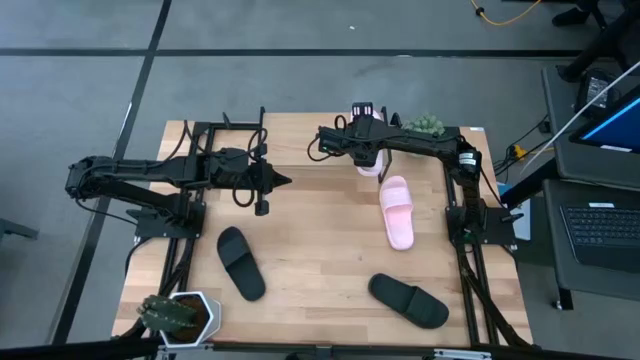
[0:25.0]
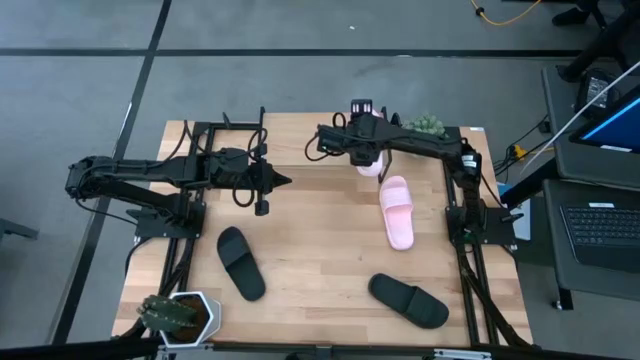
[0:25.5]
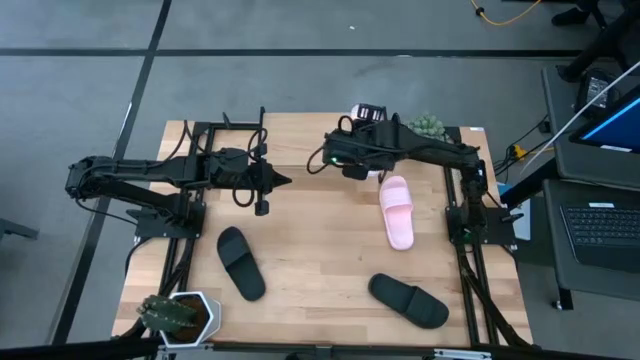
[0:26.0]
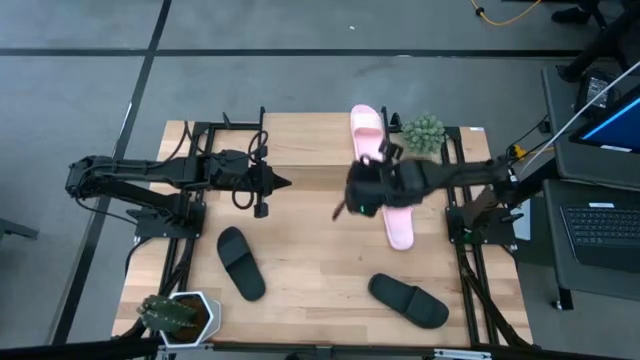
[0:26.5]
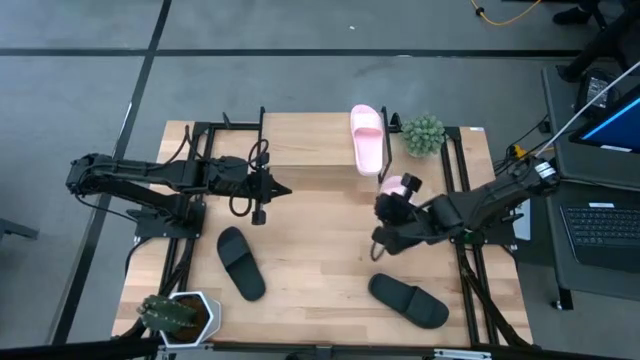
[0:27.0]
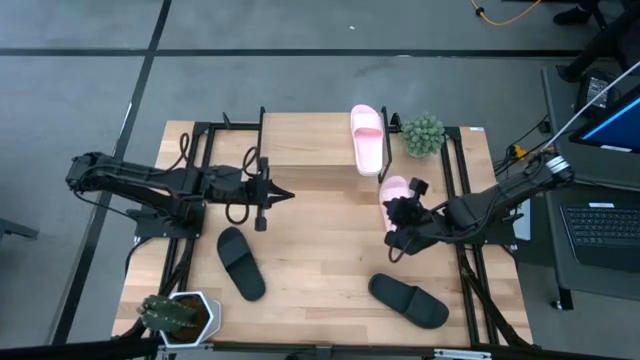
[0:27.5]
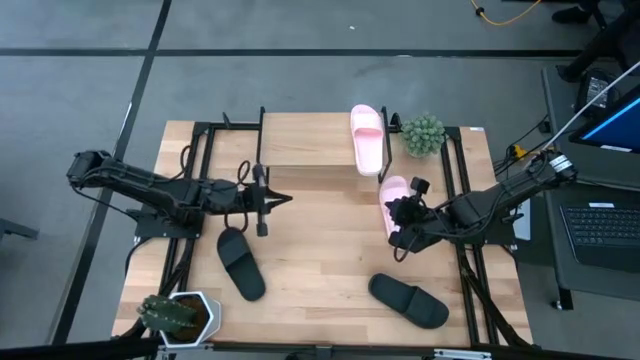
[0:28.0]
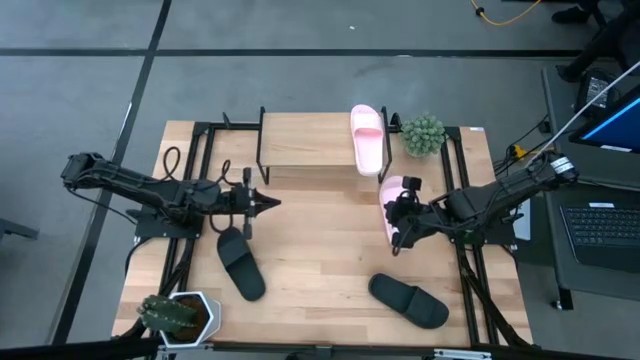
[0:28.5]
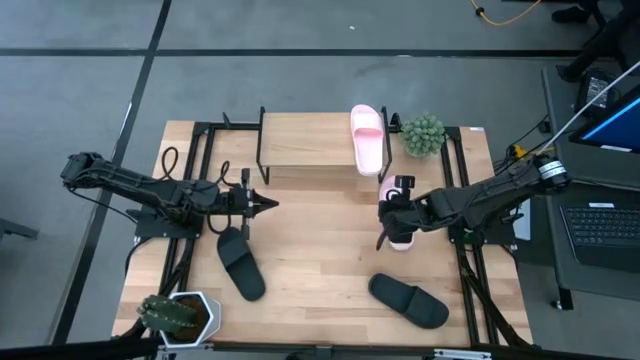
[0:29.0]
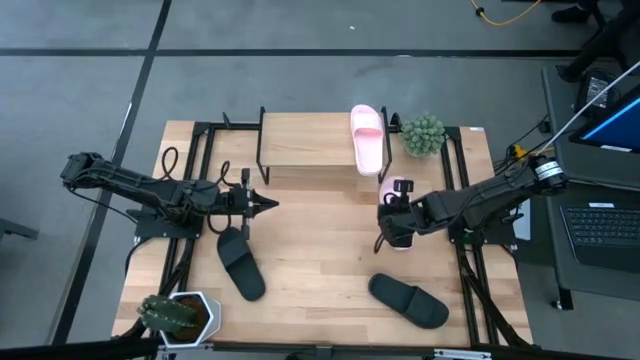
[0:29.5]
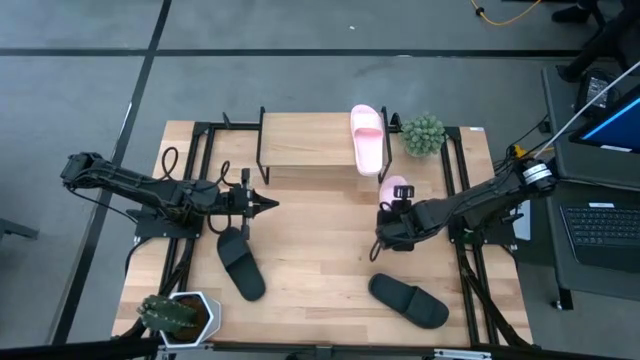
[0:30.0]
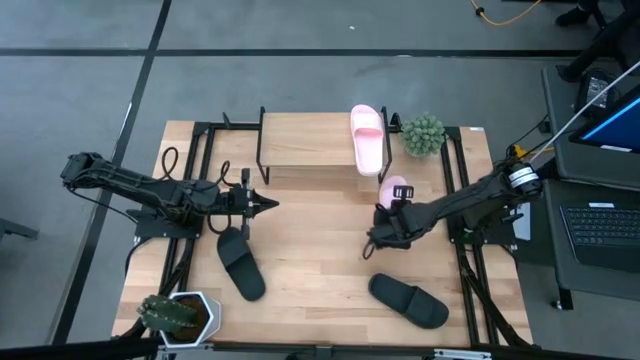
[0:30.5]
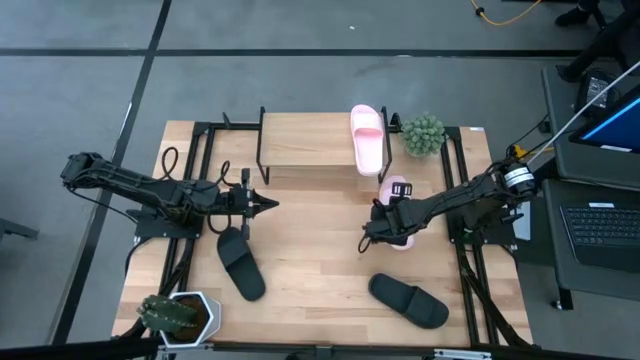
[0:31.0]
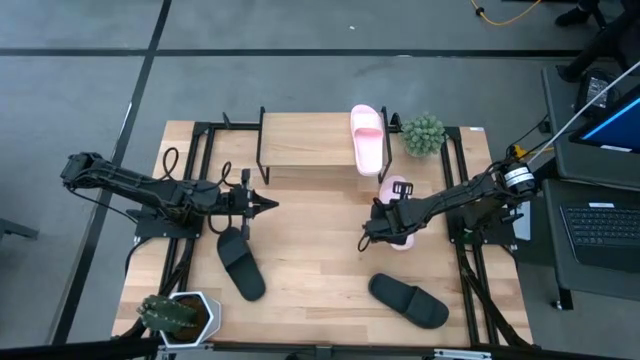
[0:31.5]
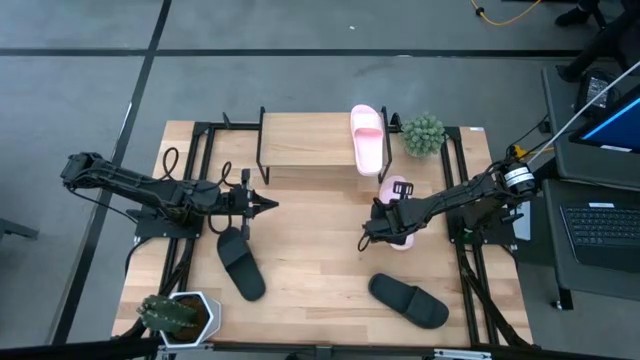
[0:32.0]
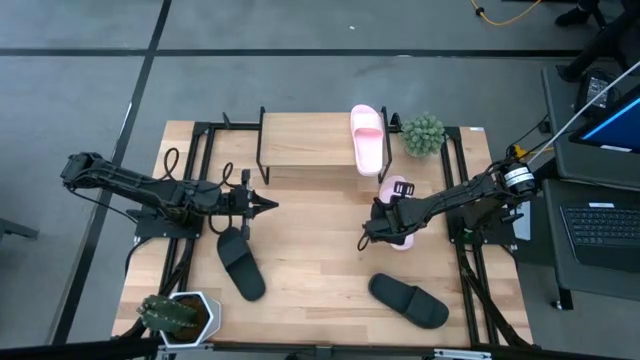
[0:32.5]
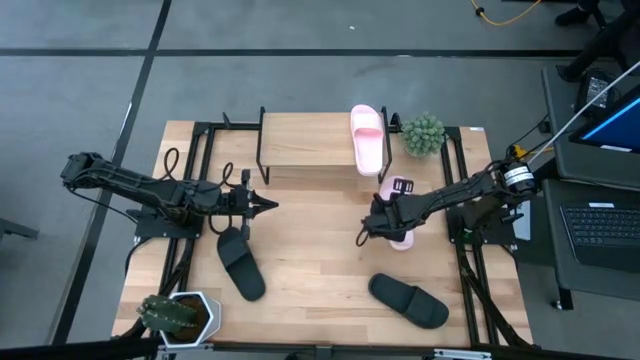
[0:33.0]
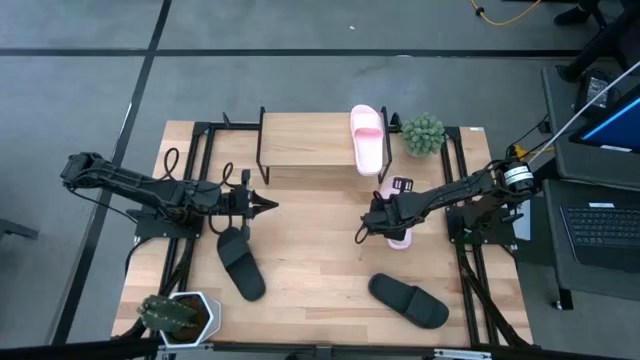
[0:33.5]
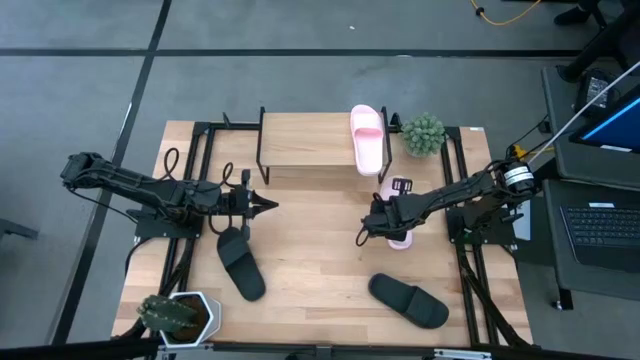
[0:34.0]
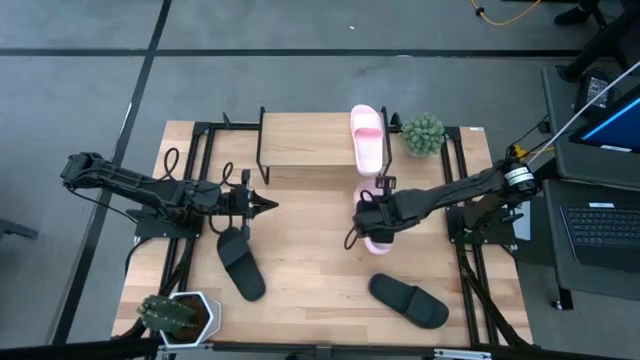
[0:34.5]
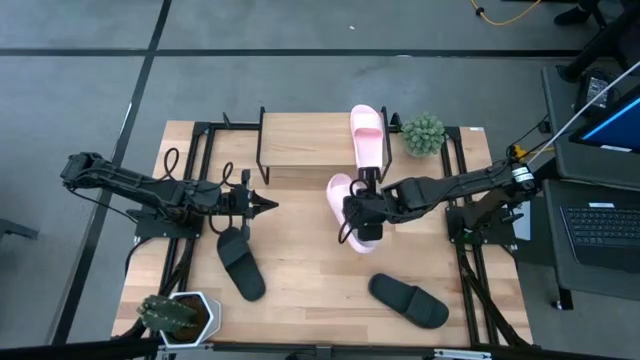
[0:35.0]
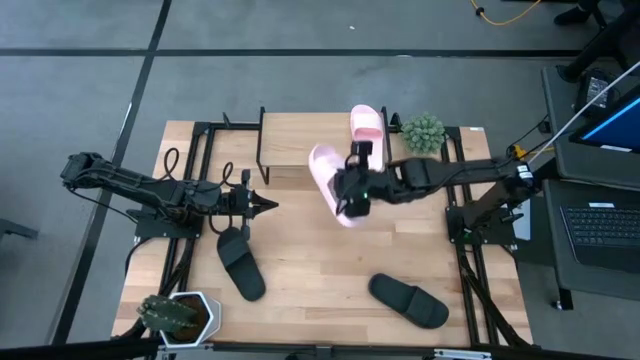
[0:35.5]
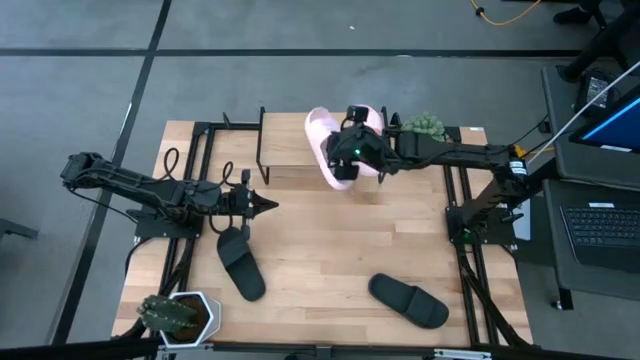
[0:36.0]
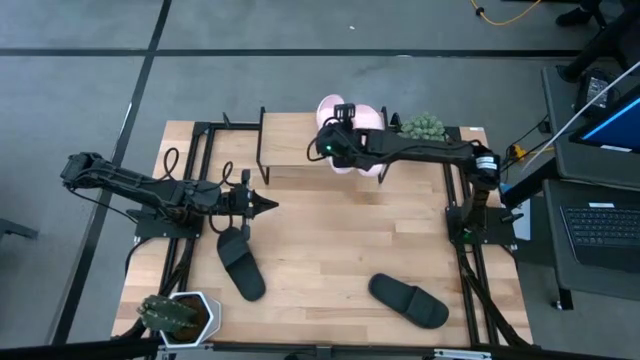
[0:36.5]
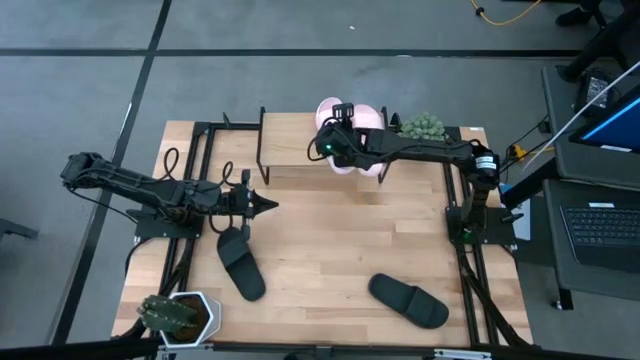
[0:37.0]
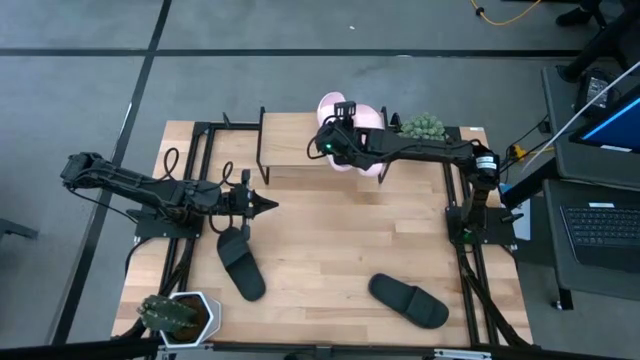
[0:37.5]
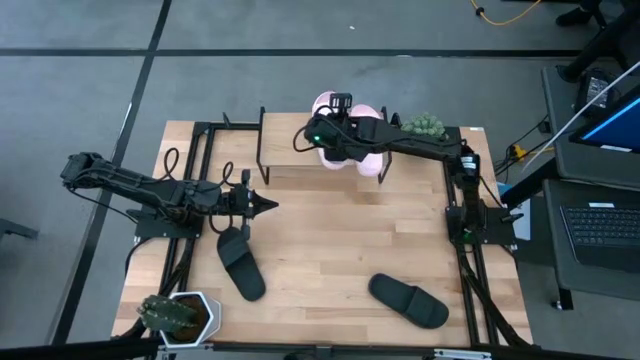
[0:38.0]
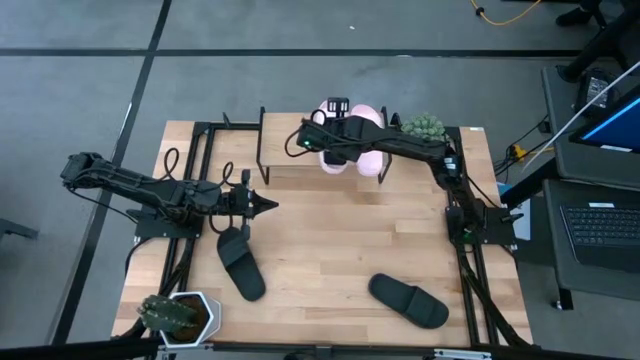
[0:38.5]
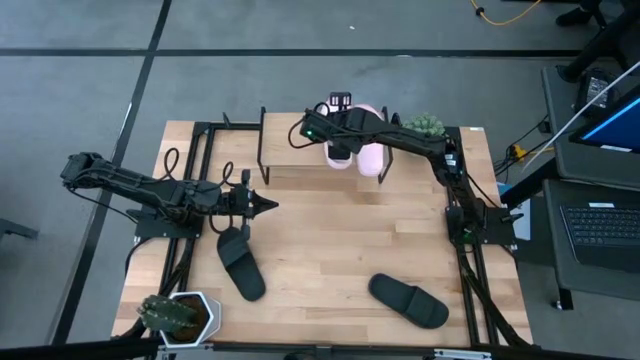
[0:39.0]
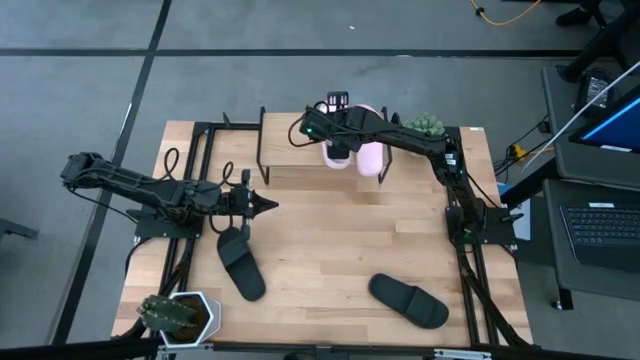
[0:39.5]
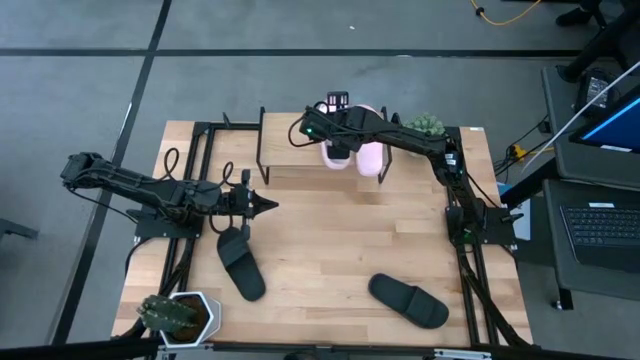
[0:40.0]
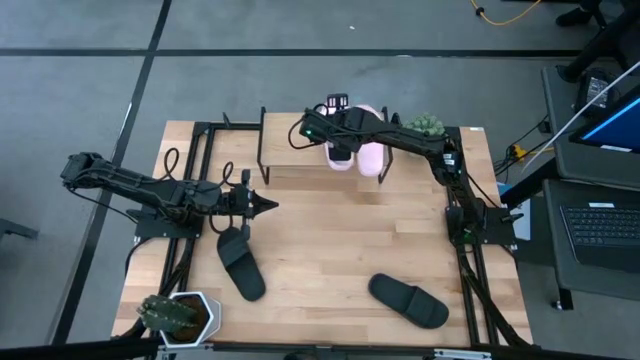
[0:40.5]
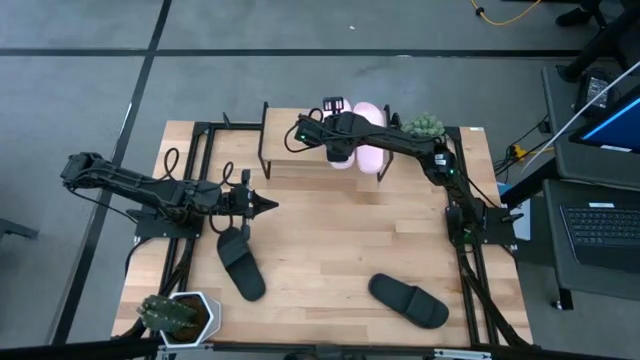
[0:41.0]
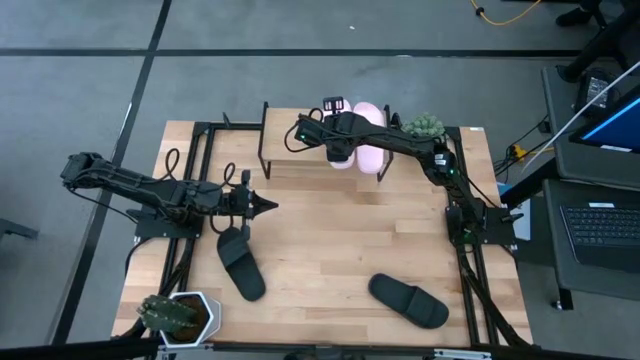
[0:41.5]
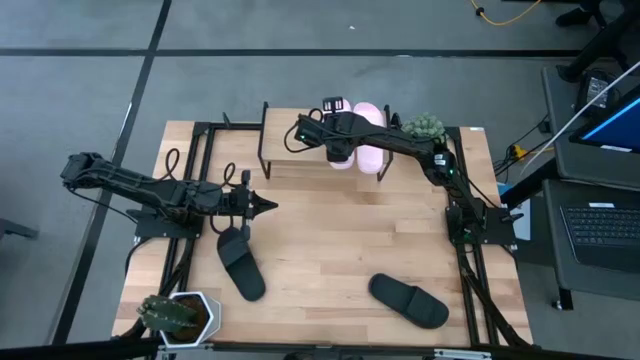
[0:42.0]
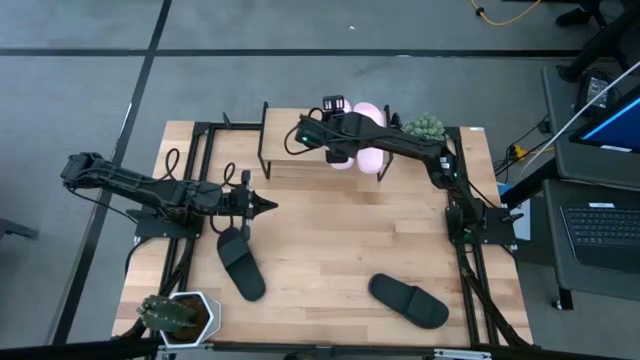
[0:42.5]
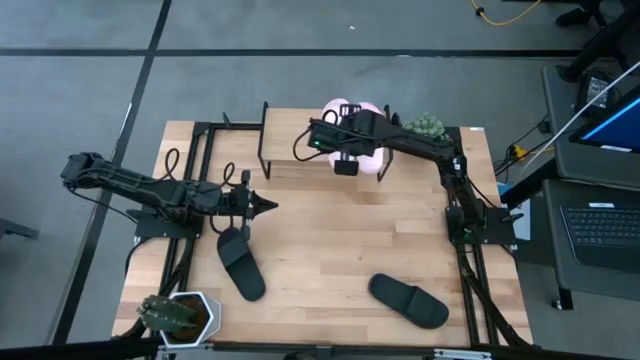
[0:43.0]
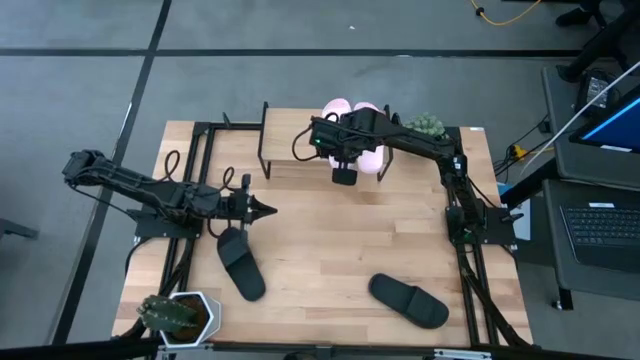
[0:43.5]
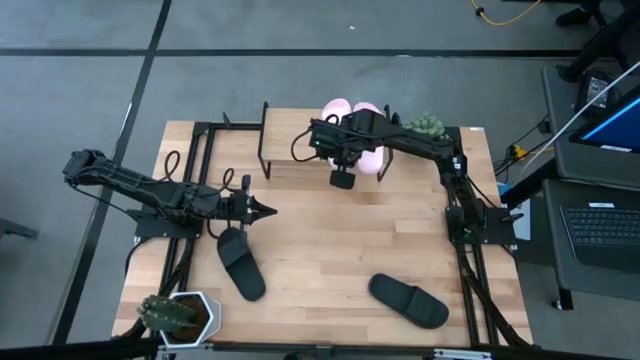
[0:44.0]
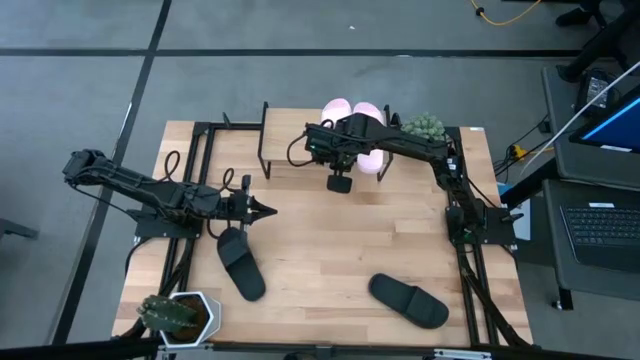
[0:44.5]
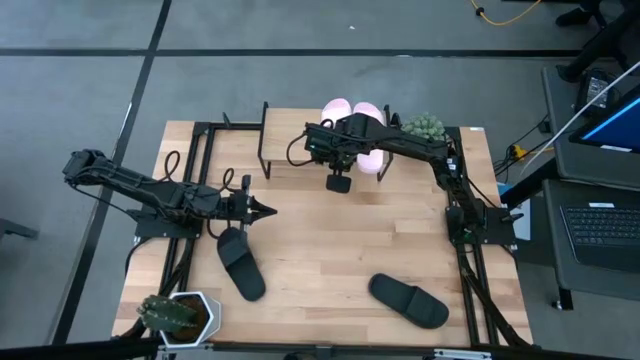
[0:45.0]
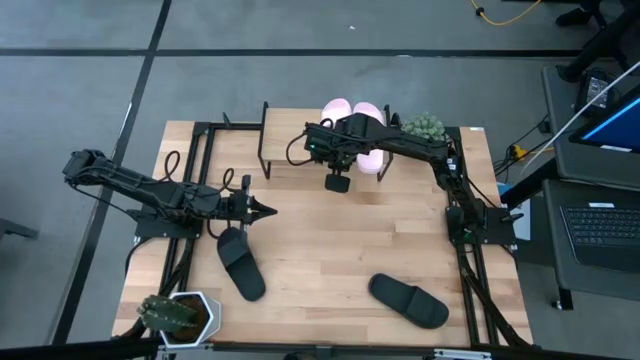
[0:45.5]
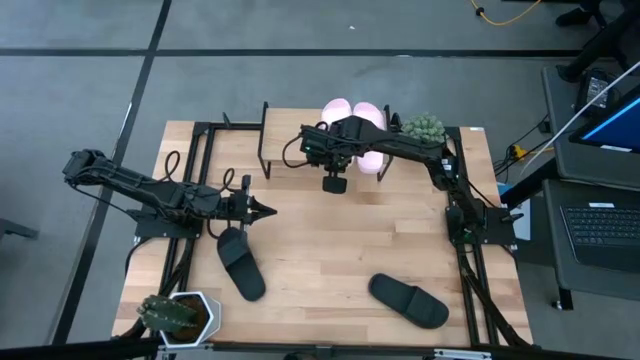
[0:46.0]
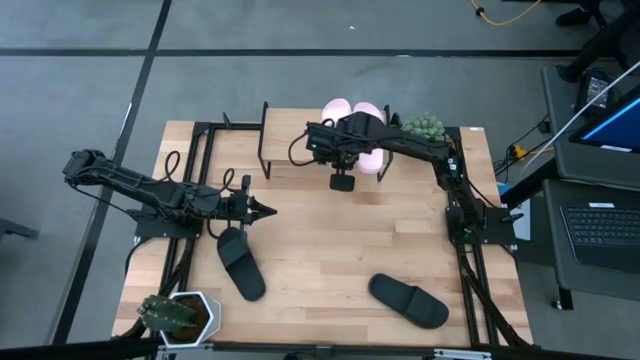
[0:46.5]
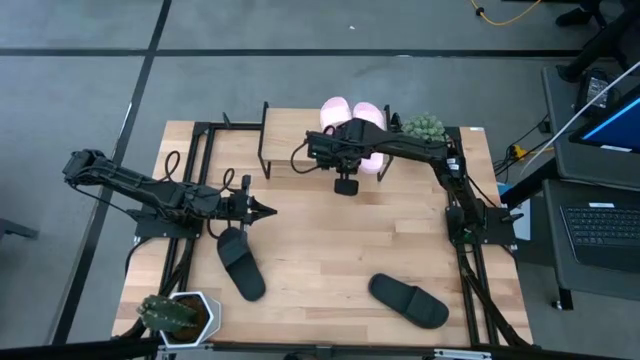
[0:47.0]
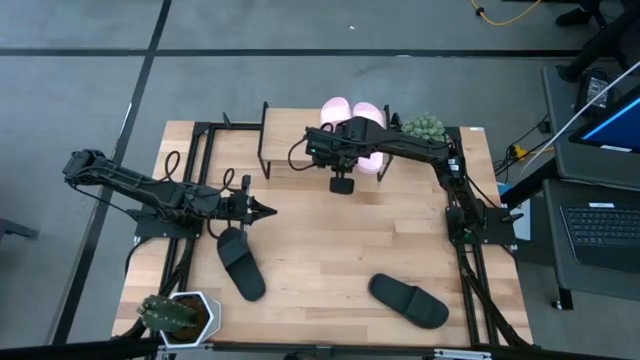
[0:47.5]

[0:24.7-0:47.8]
Task: Pick and place slides into the shelf
Put the pink slide on the shelf
